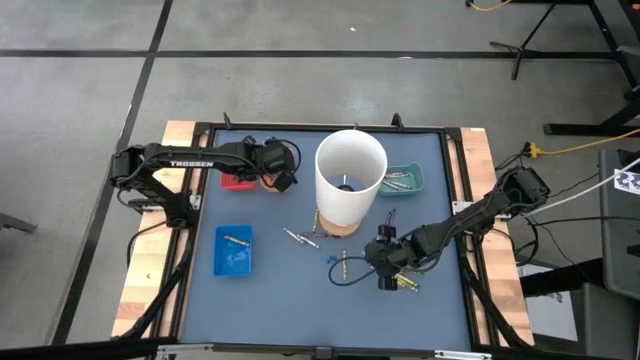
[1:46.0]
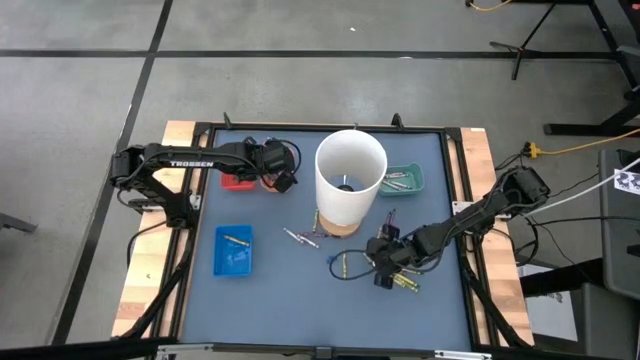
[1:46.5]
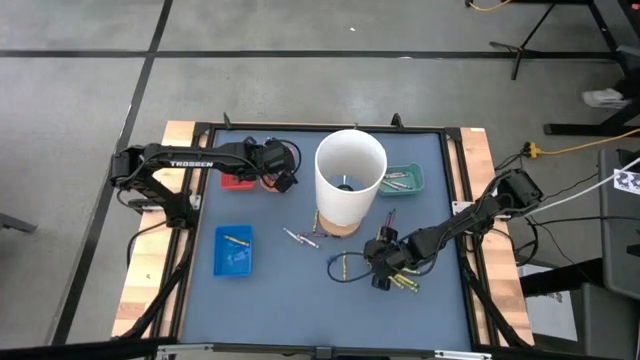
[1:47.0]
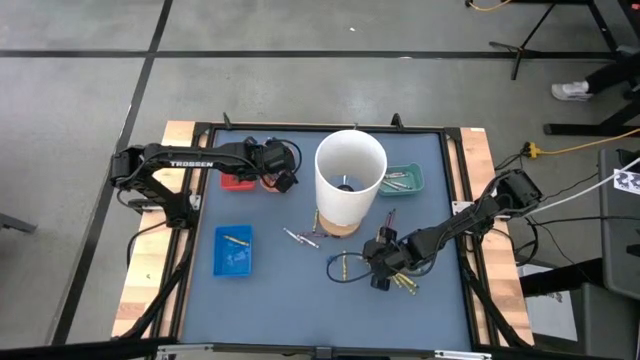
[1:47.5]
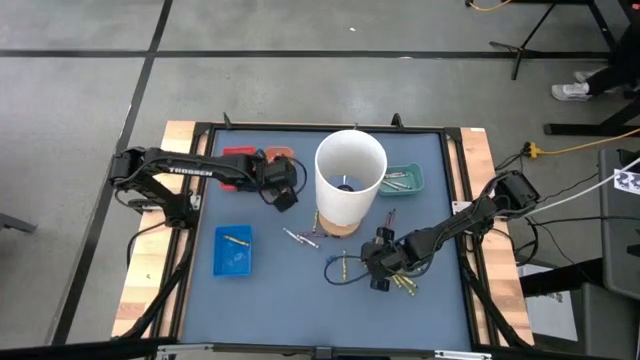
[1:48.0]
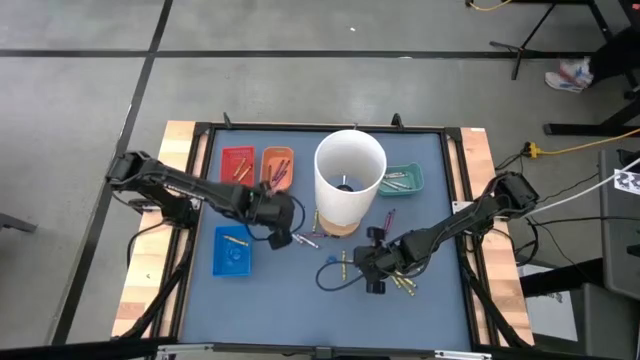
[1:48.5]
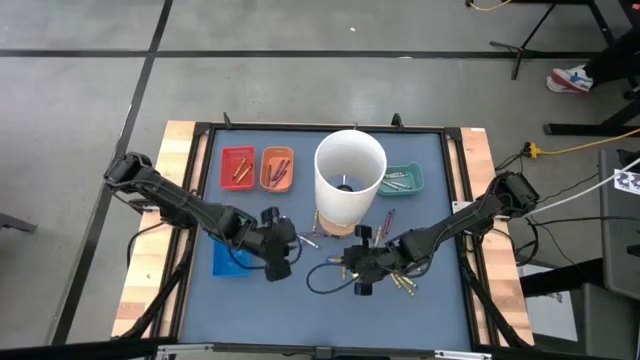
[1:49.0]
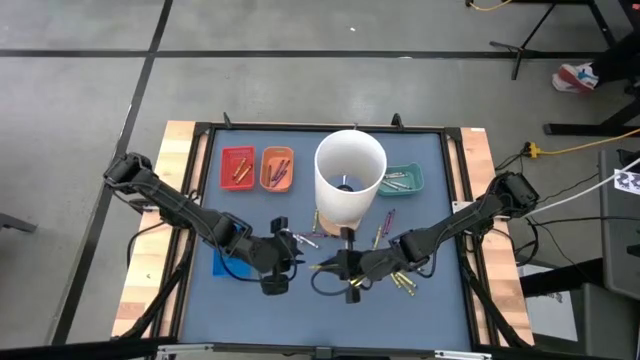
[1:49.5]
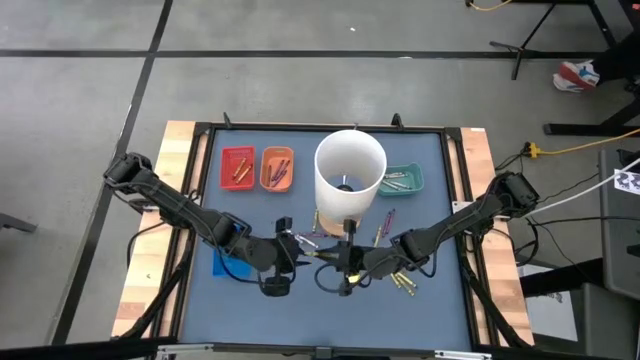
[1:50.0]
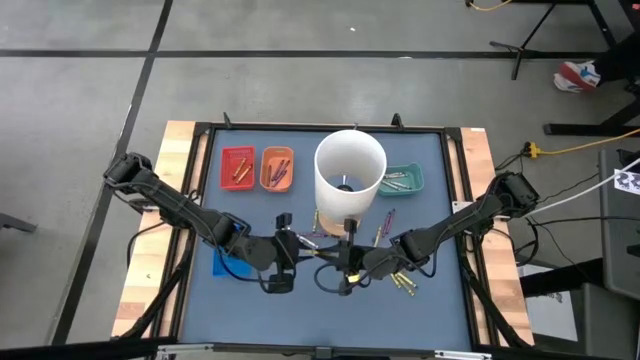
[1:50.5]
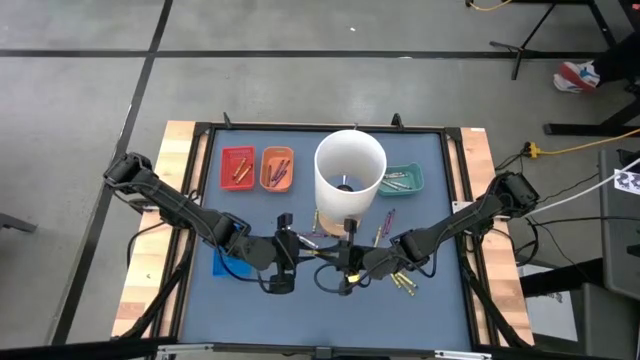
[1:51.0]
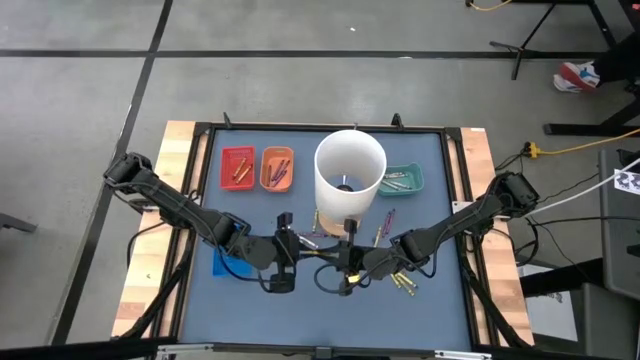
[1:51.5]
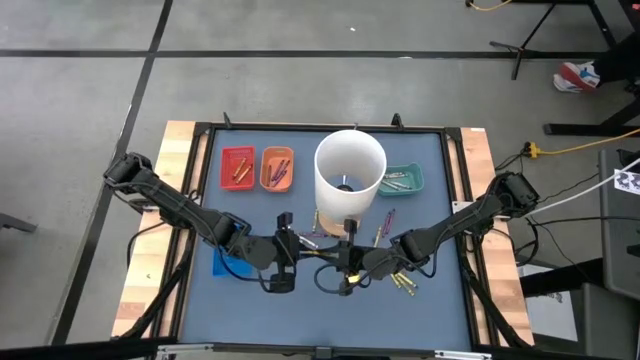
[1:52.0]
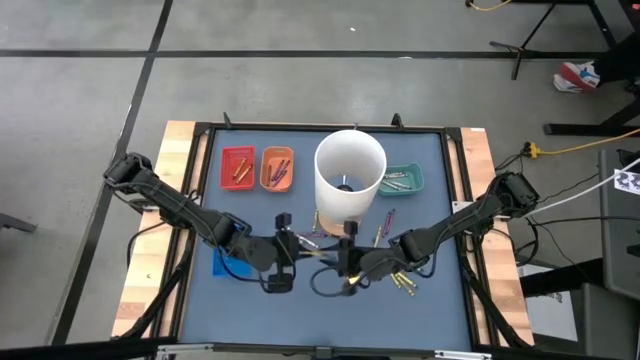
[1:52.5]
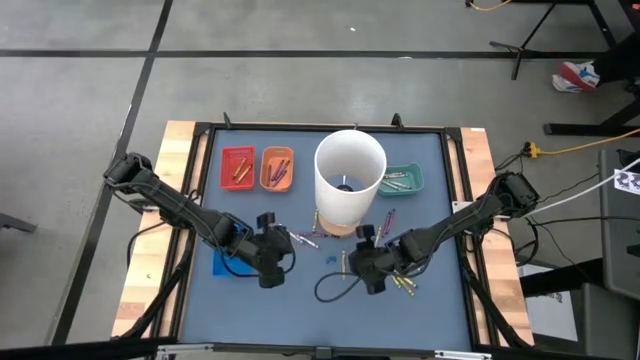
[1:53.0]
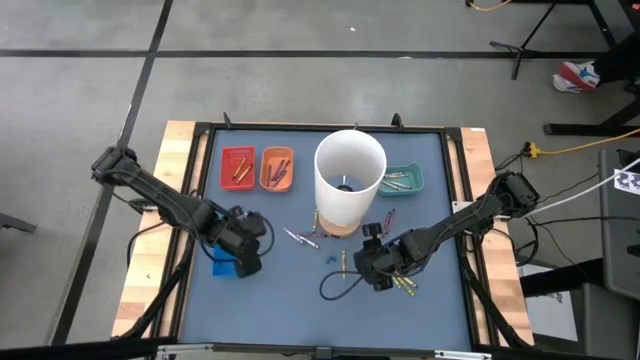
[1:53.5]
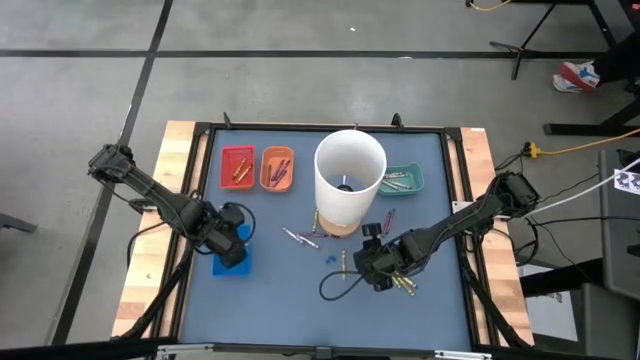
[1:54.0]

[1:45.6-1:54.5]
Task: Sort crayons
Put the yellow crayon into the blue bin

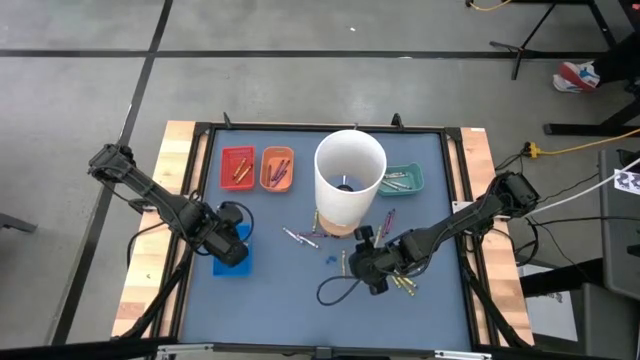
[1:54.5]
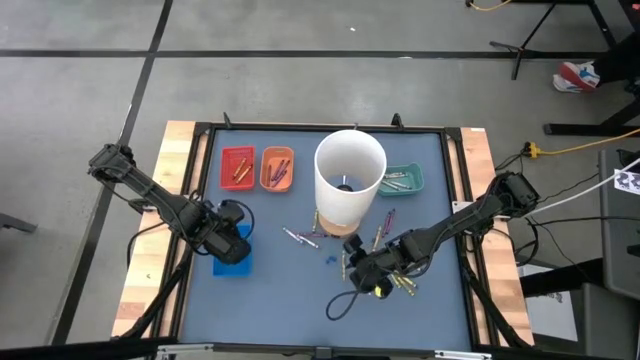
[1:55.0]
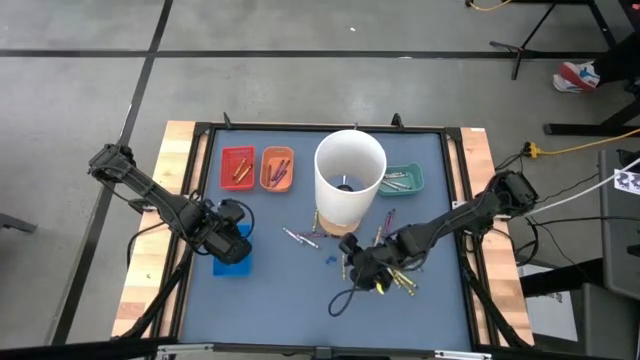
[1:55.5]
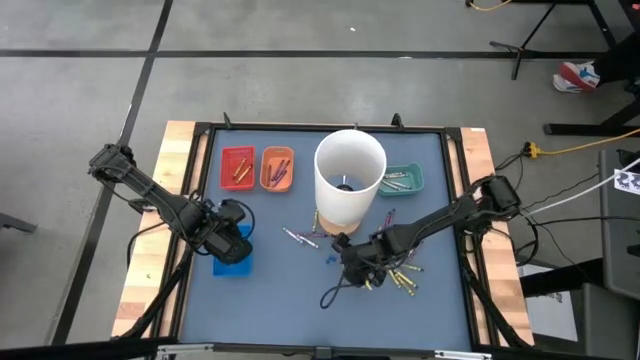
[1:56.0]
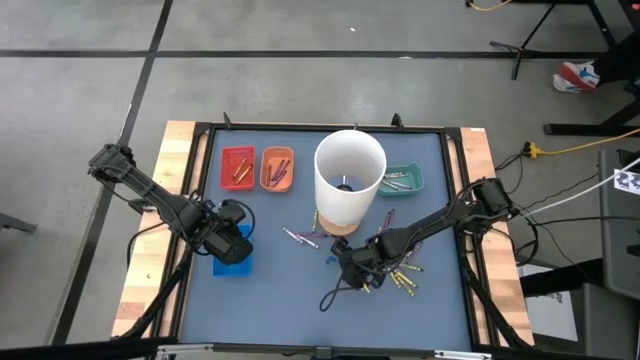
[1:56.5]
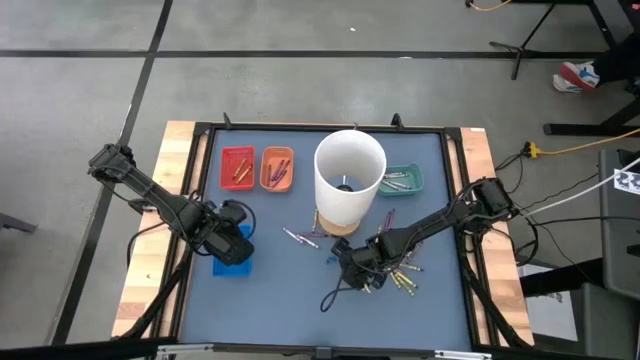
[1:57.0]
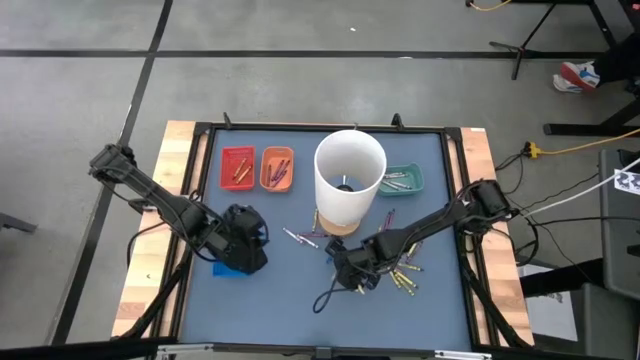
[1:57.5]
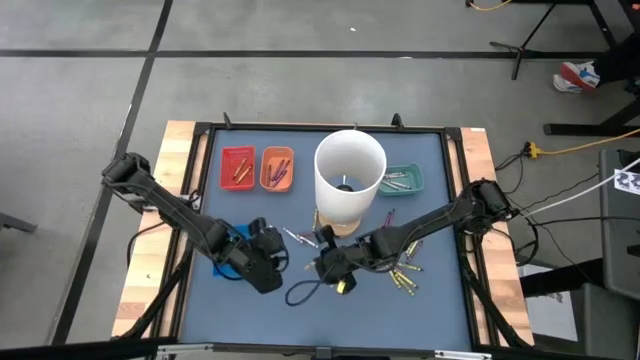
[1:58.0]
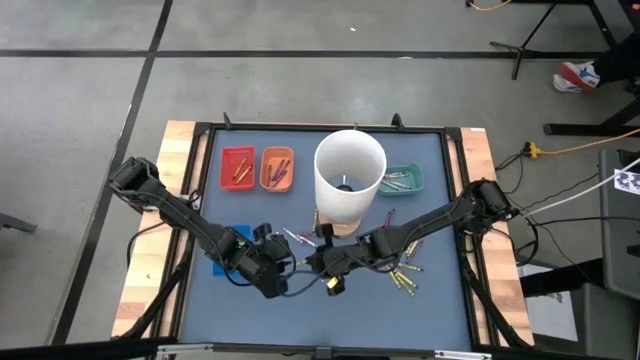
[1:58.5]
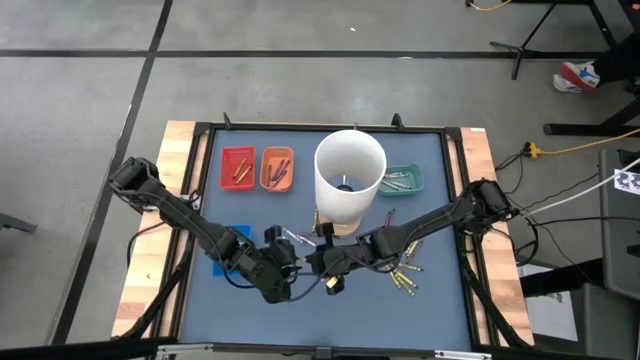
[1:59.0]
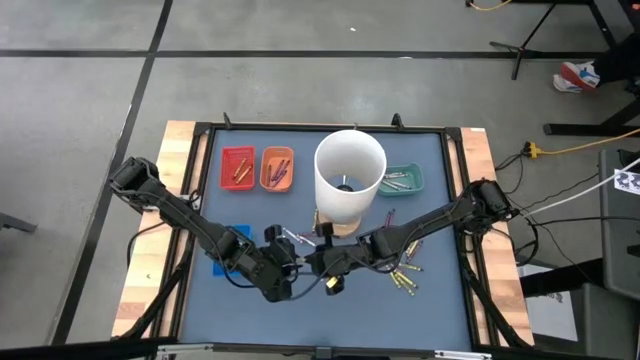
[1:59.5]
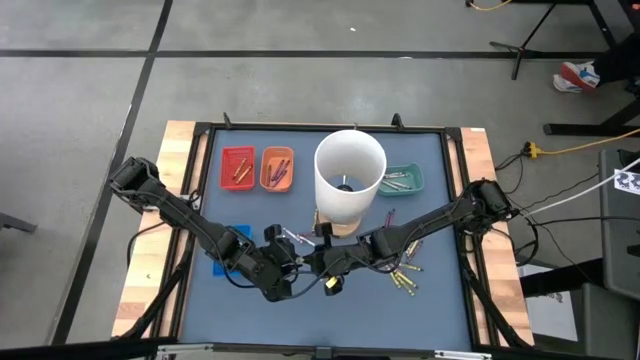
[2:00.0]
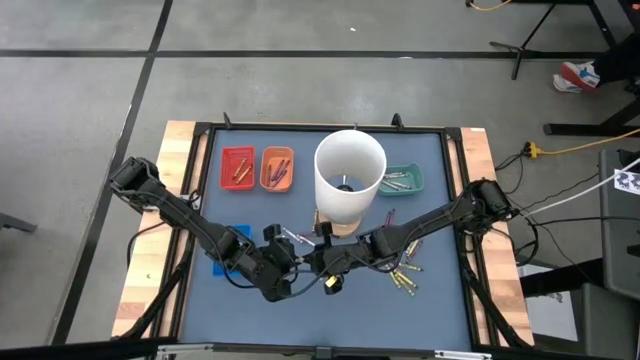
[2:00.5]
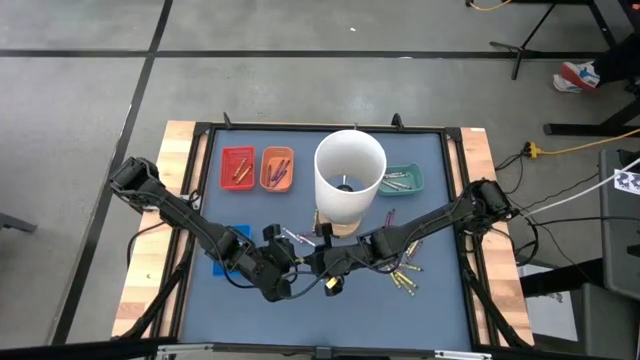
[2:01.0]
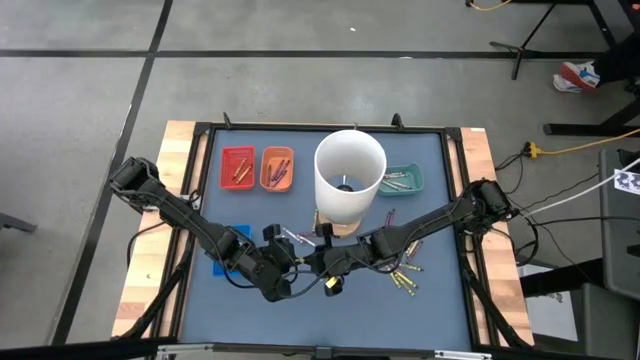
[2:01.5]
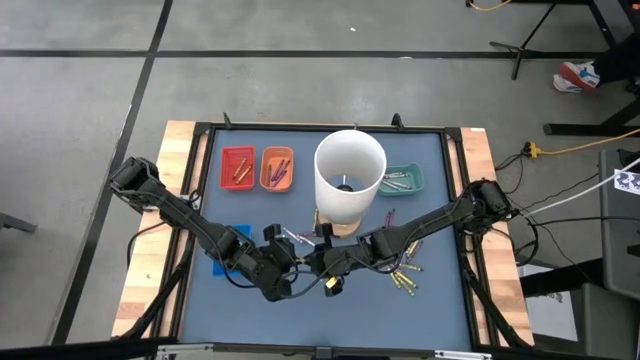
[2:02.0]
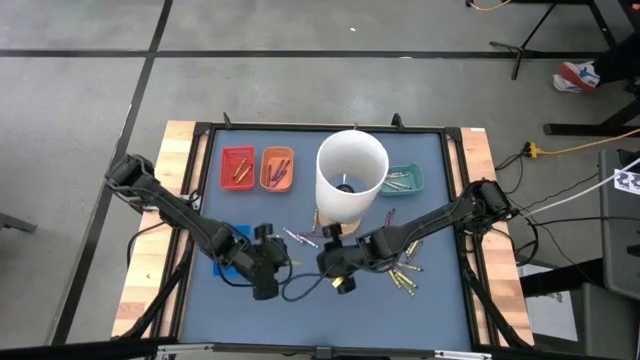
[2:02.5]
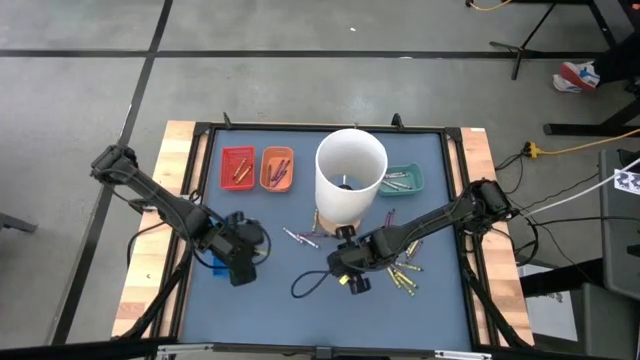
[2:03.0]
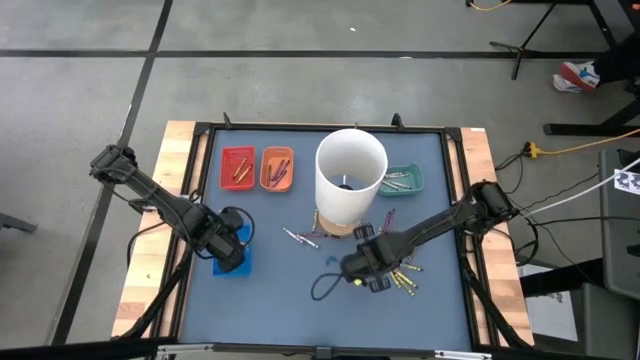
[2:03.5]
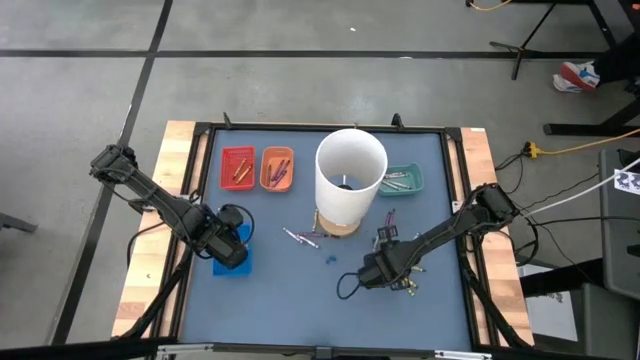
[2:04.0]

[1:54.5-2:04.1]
Put the yellow crayon into the blue bin

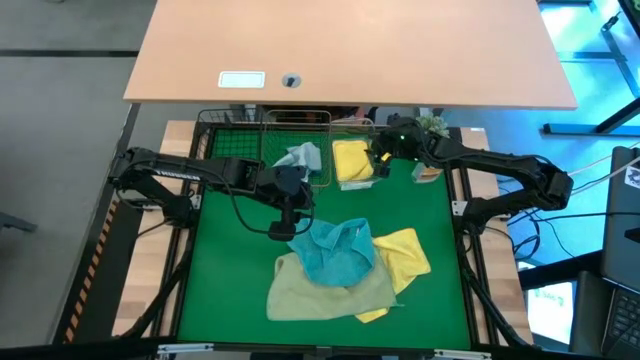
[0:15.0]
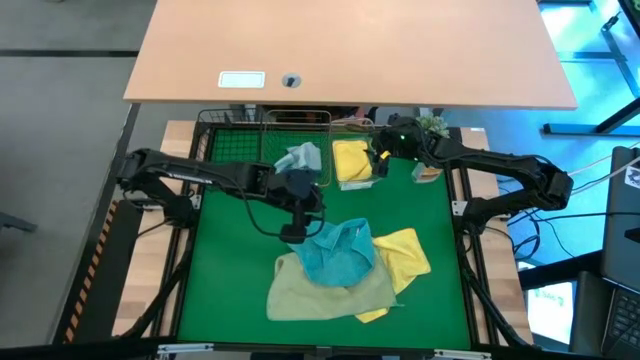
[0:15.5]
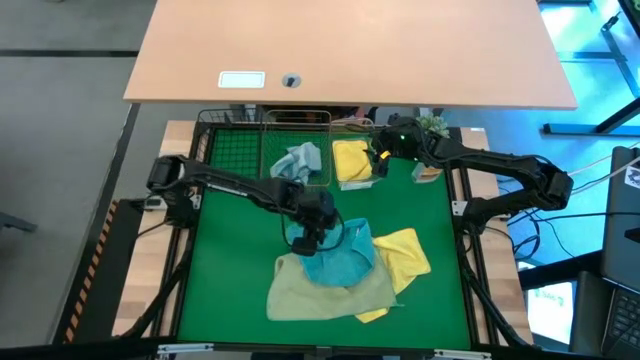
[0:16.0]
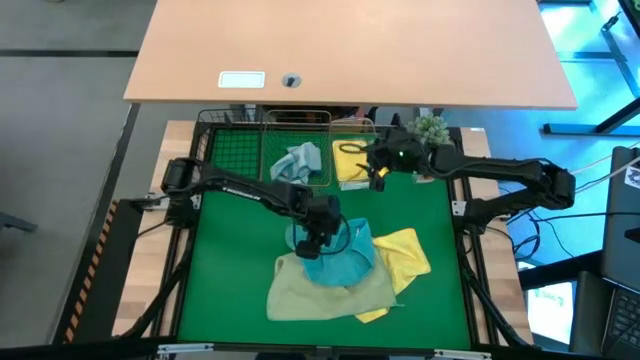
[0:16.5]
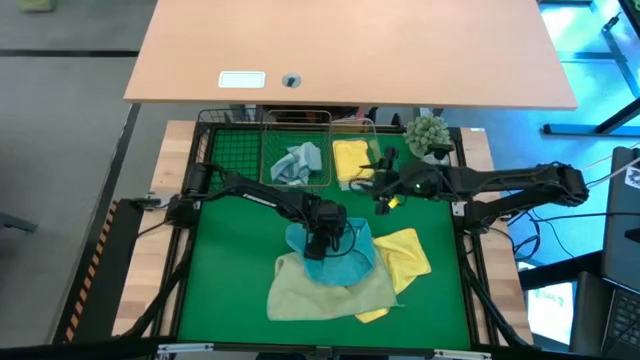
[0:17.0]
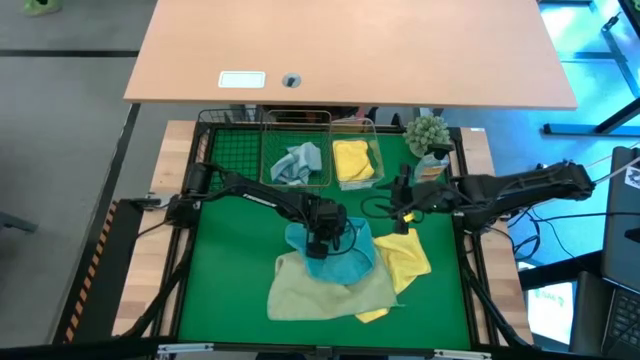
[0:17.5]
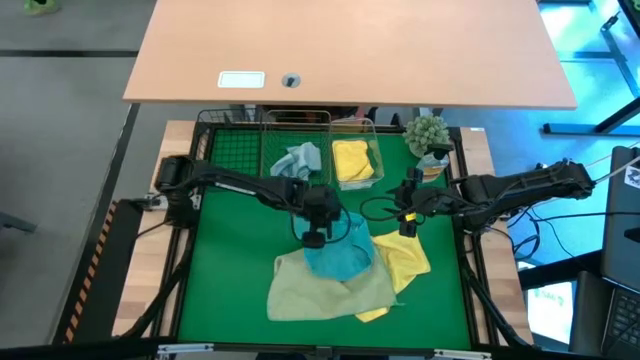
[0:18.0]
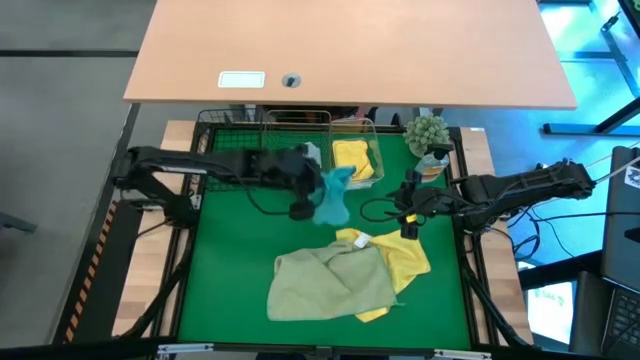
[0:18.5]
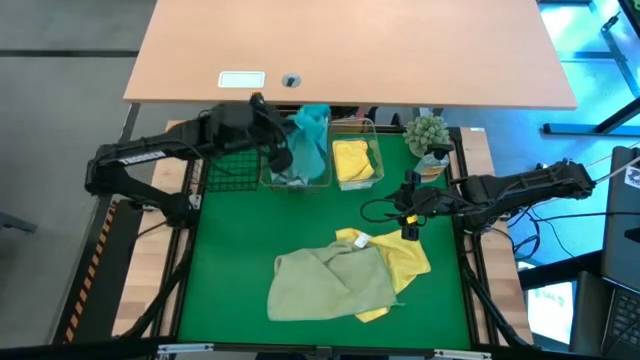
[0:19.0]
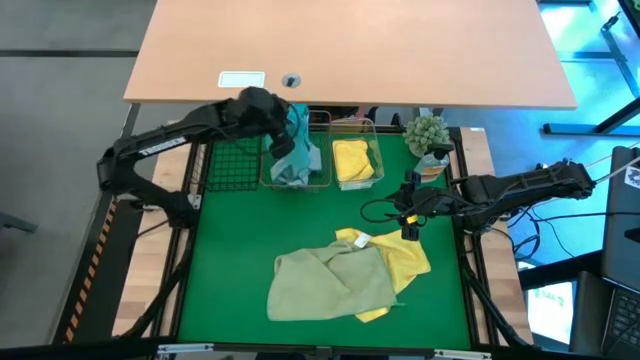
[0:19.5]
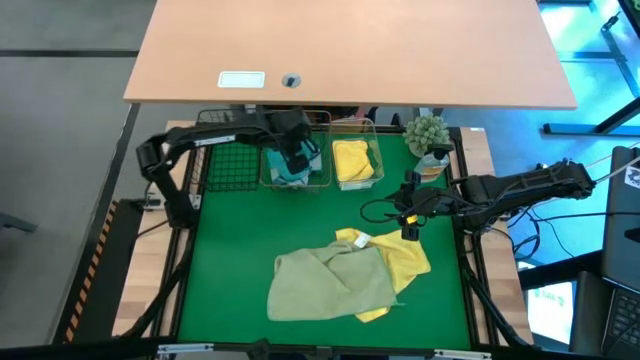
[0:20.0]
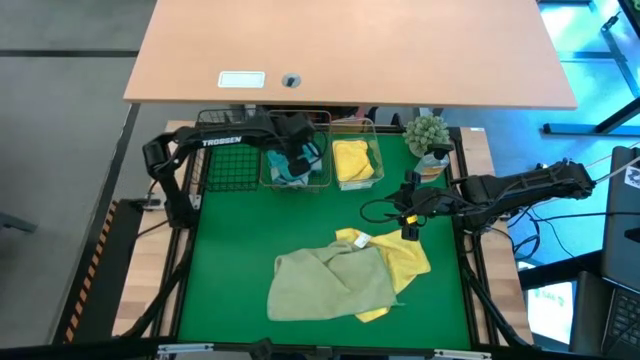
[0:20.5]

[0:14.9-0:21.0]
Task: Sort microfiber towel by color & place in baskets
Put the blue microfiber towel into the golden wire basket
